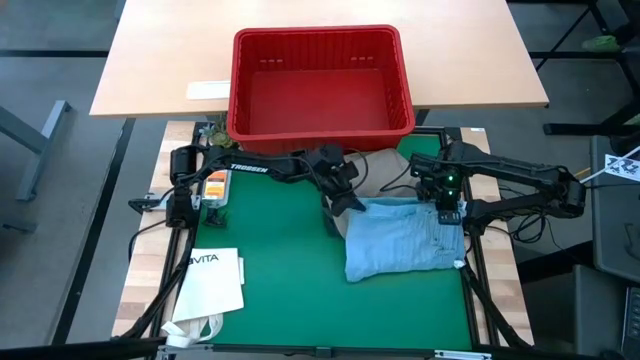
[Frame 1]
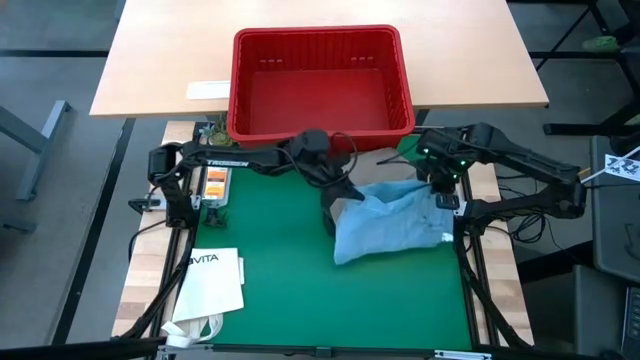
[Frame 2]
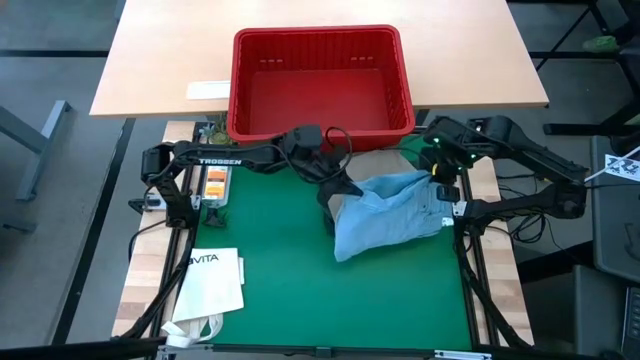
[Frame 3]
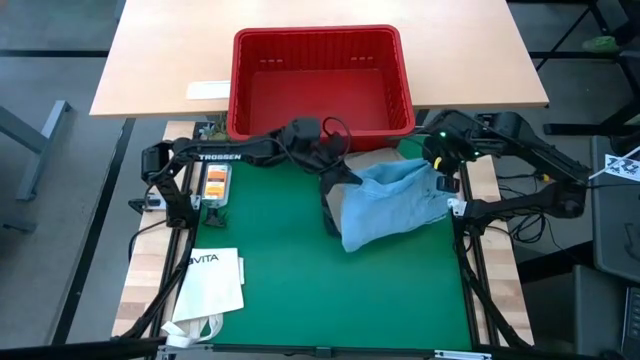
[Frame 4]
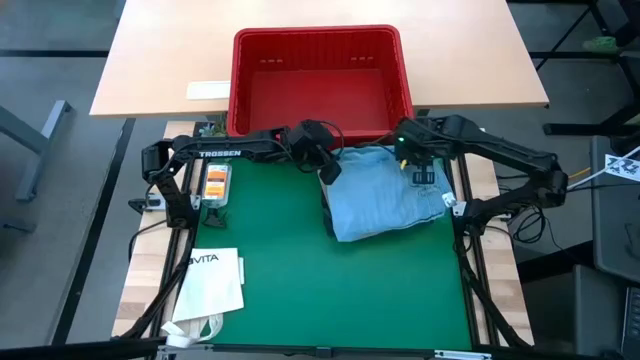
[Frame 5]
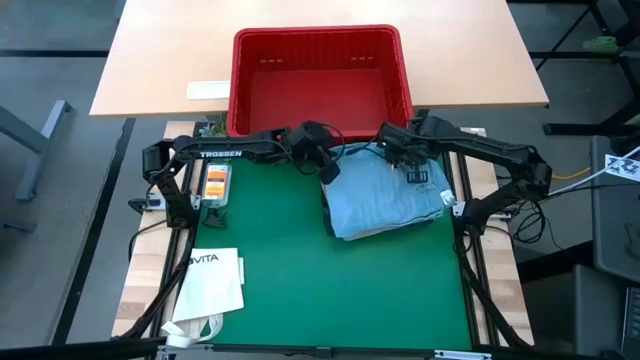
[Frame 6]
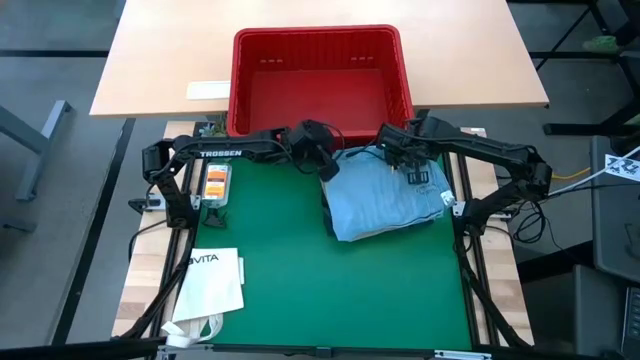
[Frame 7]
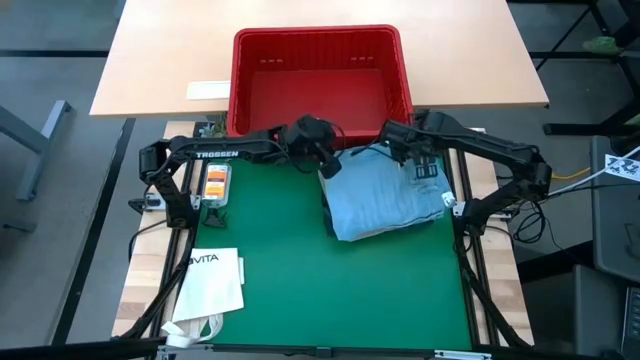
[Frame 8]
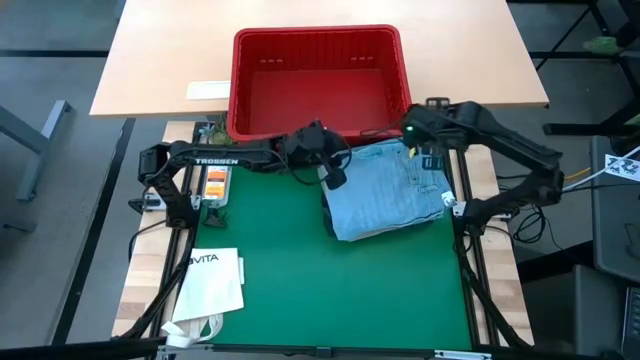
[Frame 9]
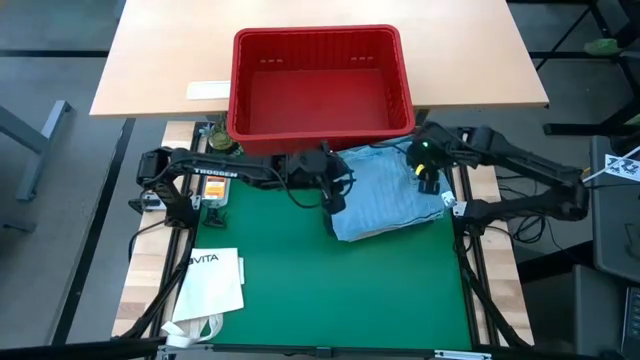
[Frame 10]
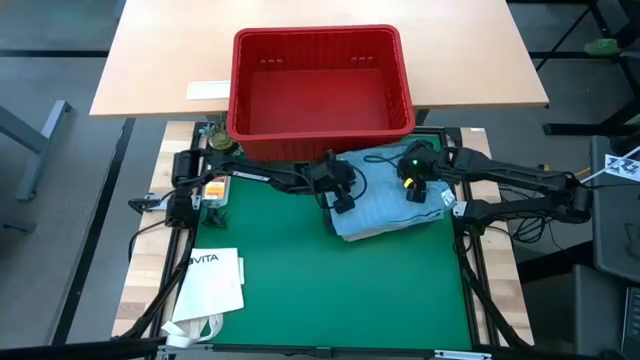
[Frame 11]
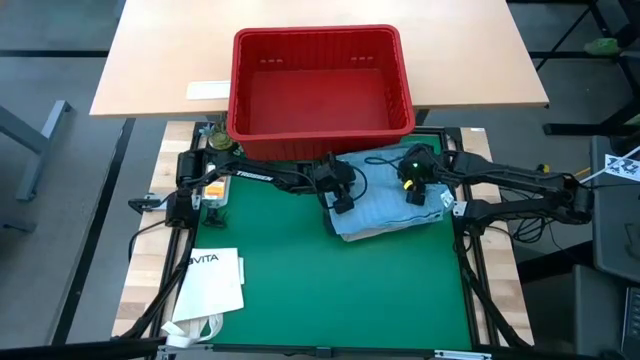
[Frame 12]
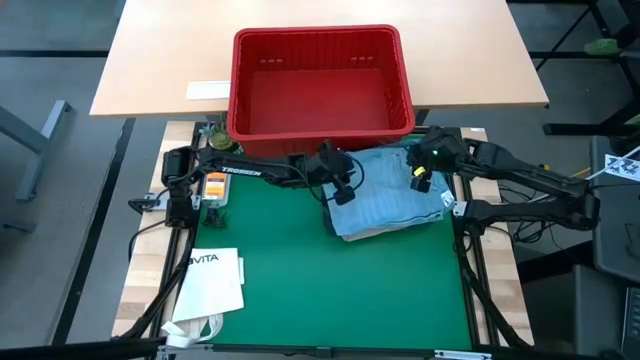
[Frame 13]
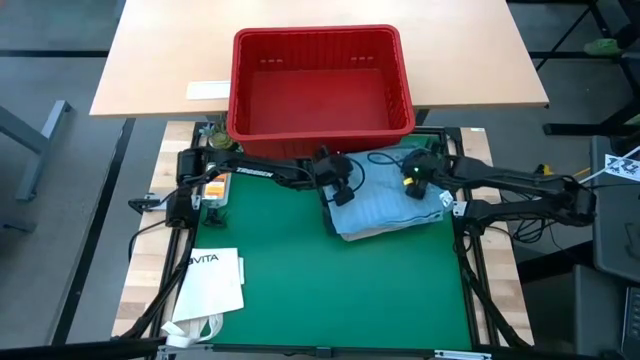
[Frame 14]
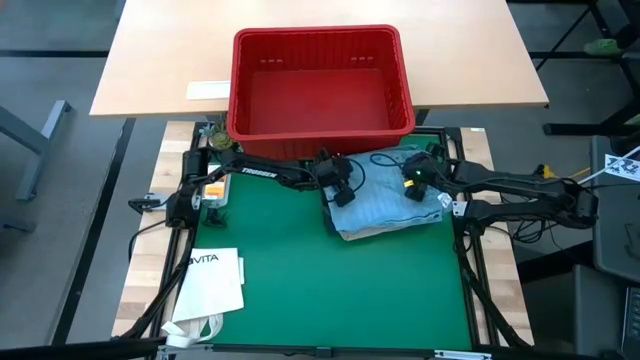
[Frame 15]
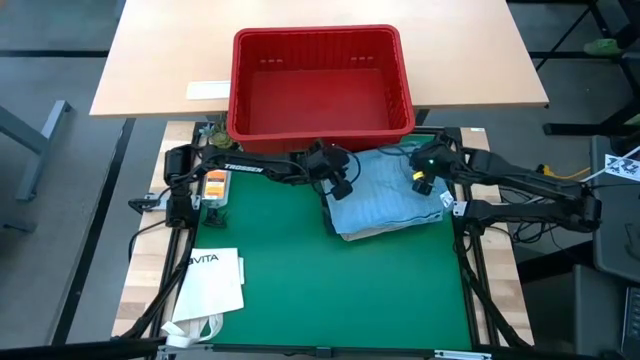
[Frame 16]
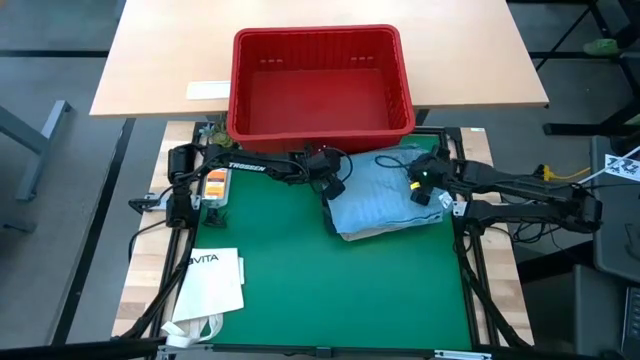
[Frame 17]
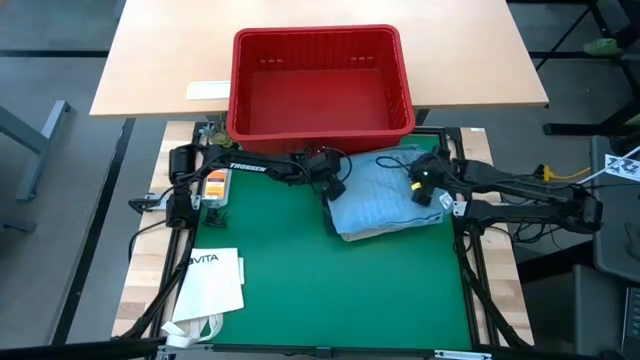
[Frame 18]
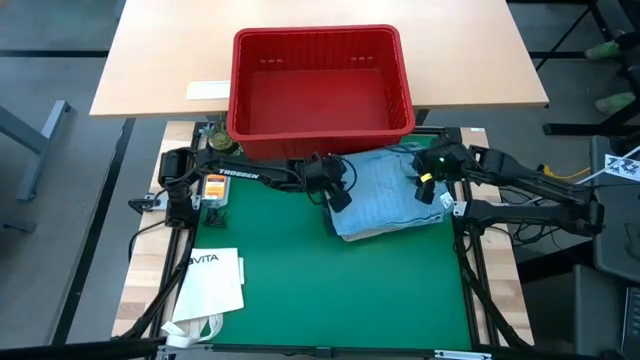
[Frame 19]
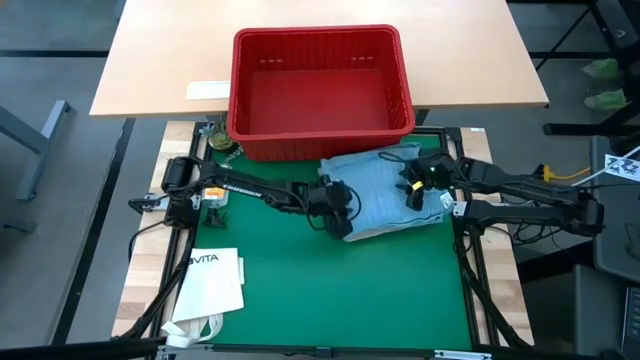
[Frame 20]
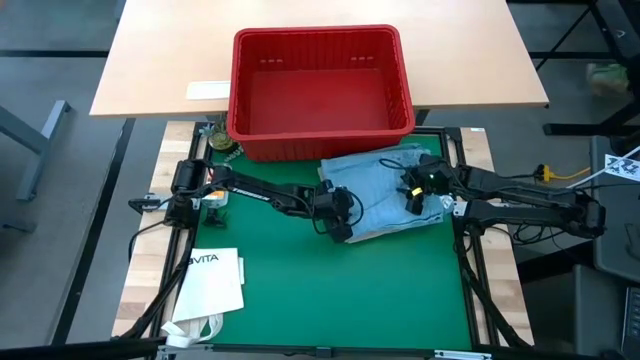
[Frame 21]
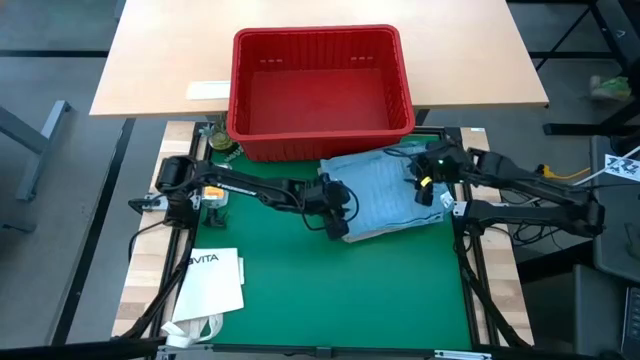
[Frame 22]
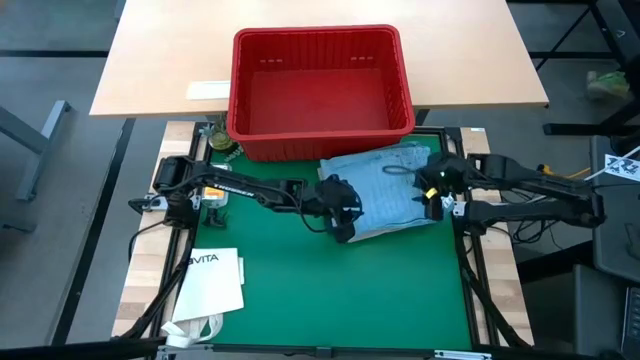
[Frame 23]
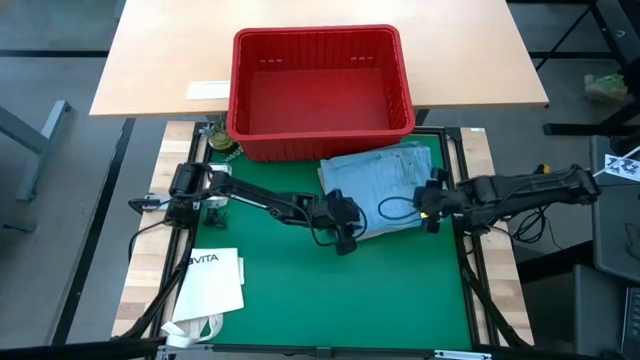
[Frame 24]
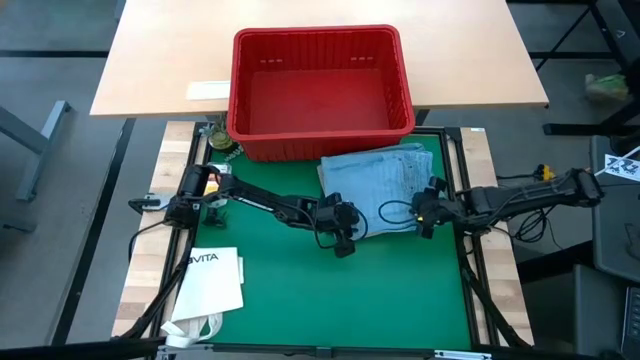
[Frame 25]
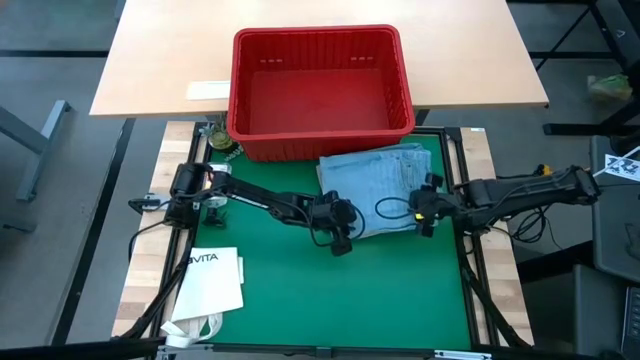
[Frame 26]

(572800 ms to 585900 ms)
Task: Fold Laundry from Bin
Stack the light blue pants on top of the gray shorts

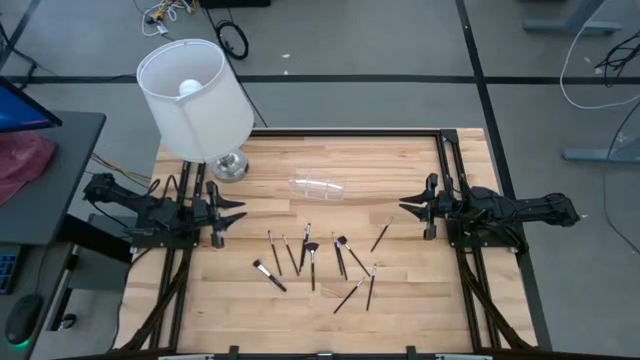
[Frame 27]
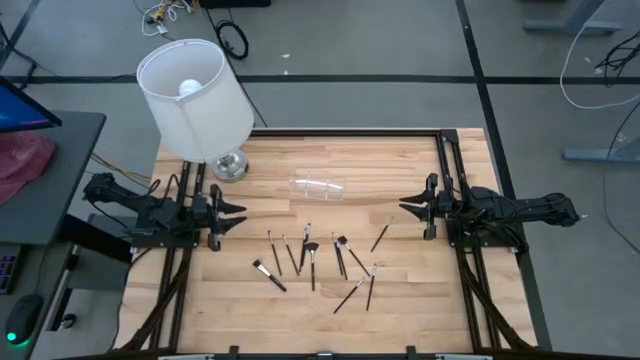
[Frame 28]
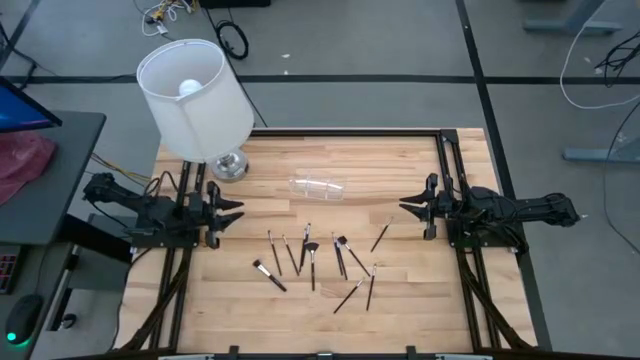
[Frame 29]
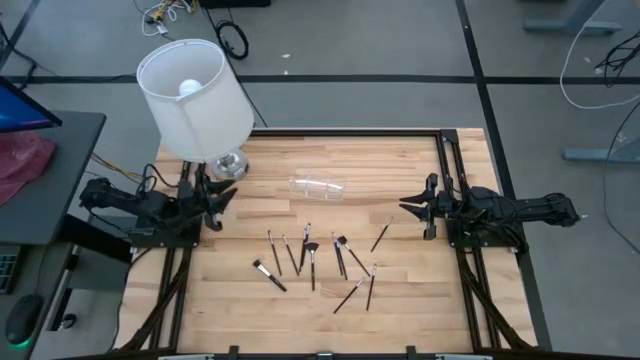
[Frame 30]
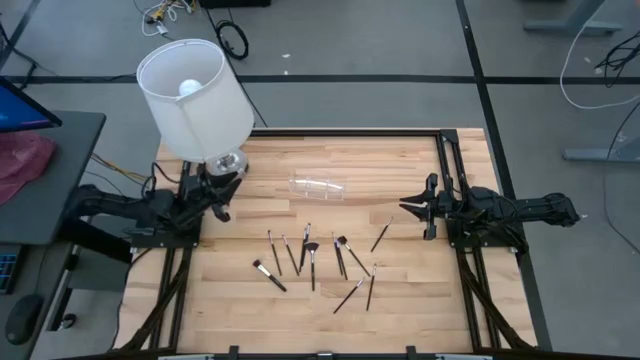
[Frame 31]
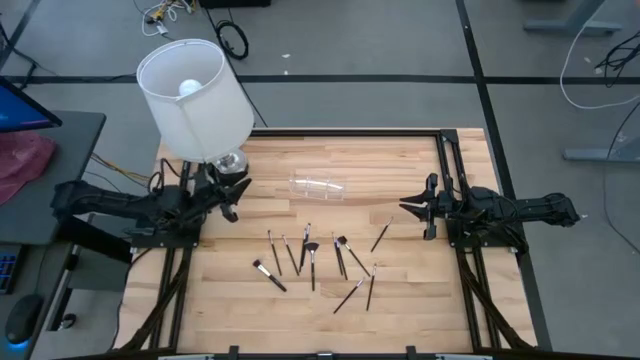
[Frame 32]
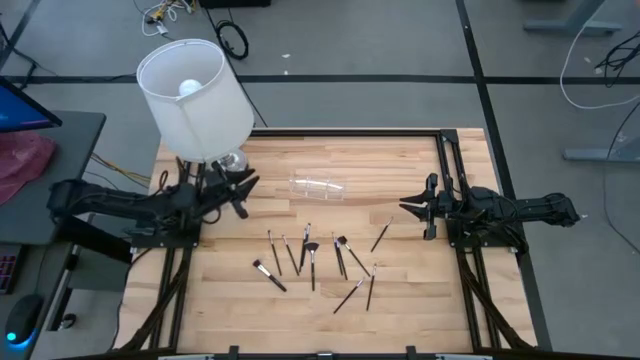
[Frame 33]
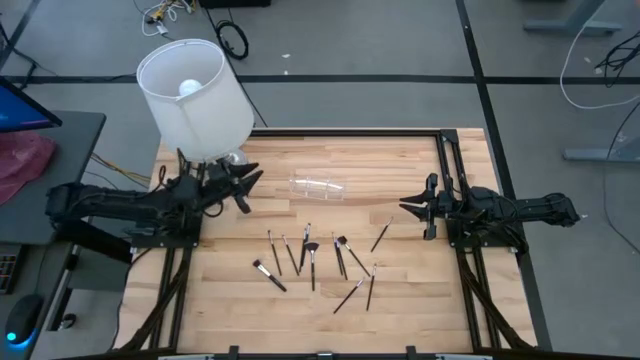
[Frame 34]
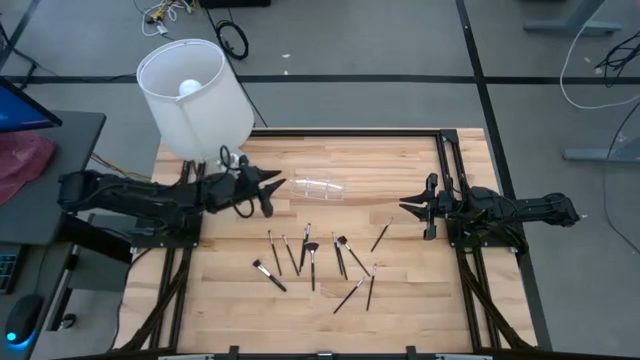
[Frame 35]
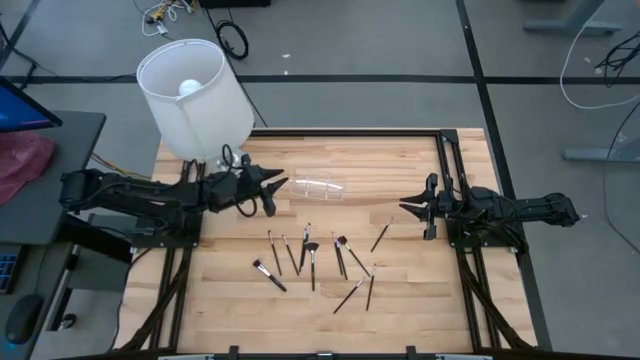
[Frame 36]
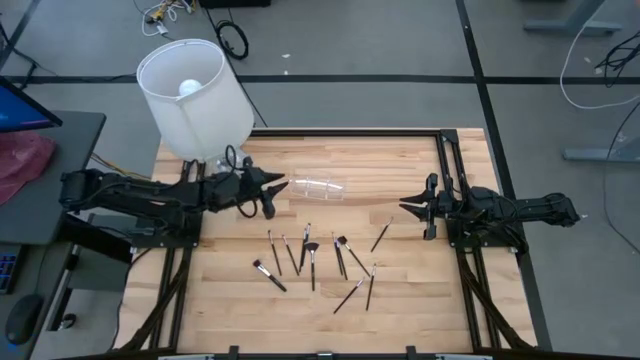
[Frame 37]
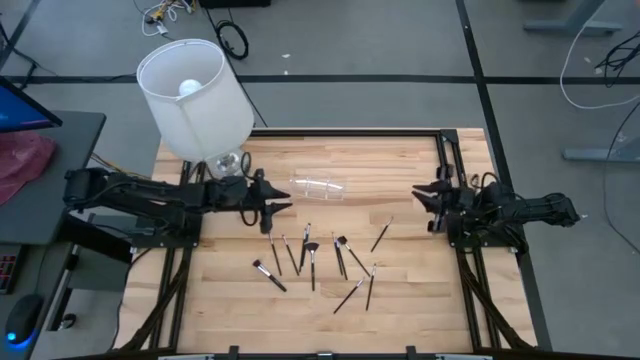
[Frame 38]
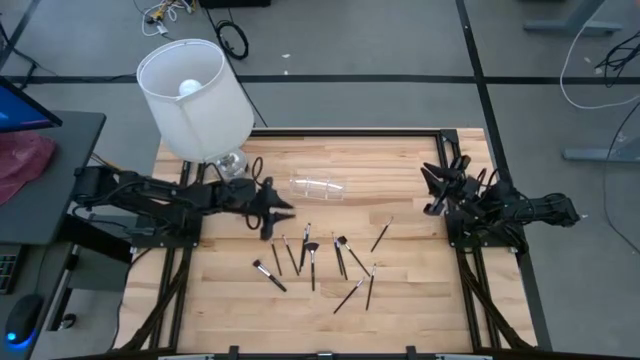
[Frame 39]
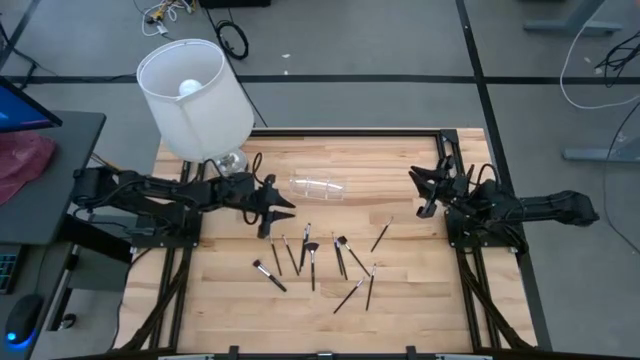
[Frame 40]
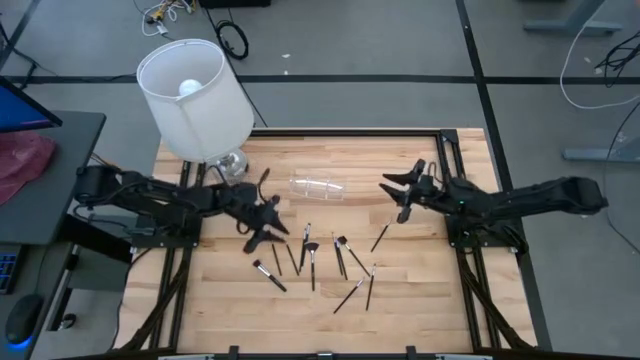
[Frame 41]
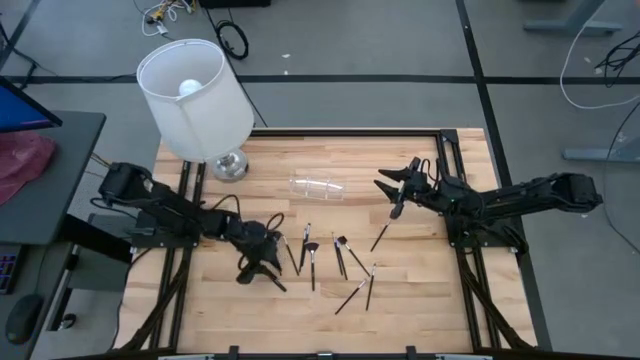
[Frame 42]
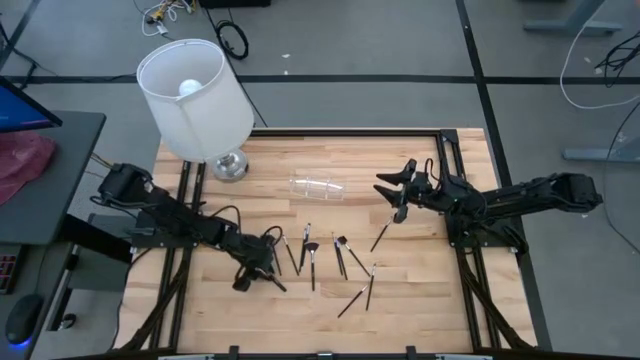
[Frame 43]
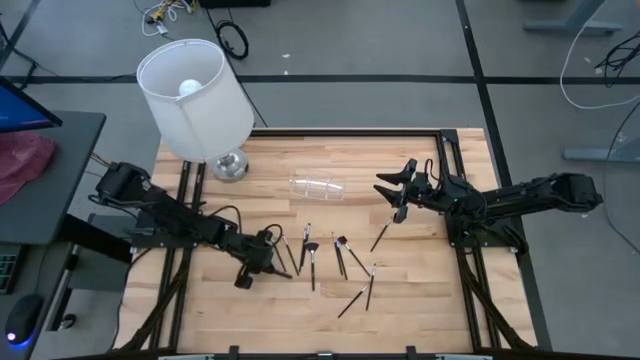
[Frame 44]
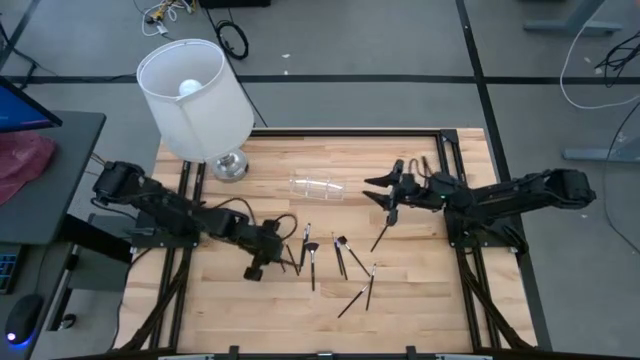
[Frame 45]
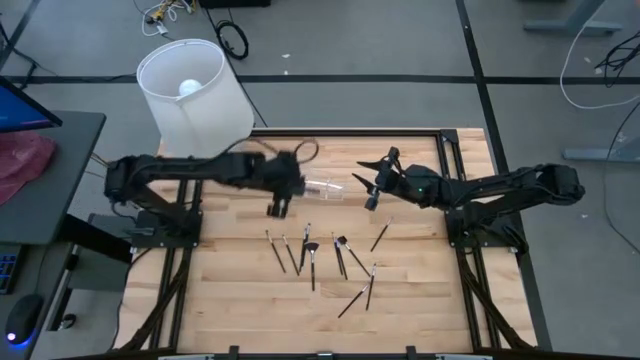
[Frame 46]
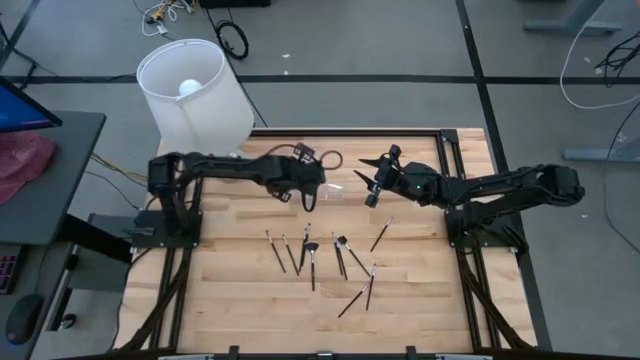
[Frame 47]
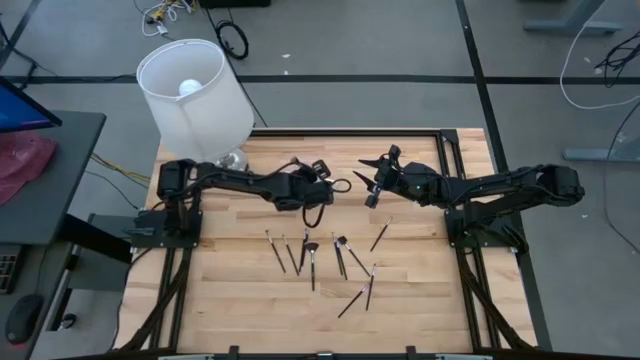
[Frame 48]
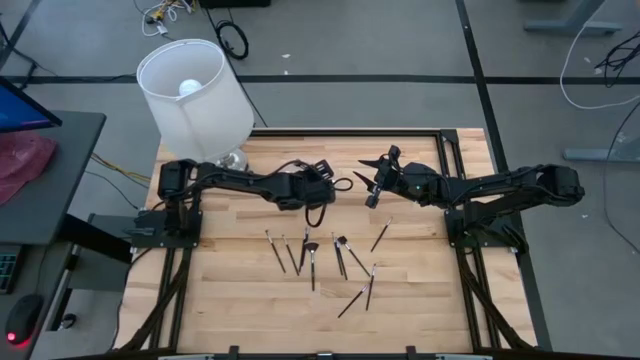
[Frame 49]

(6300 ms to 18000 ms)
Task: Put items in baskets/containers
Put the black powder brush into the transparent organizer
